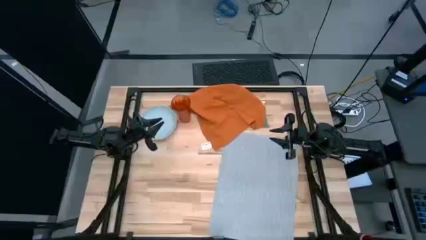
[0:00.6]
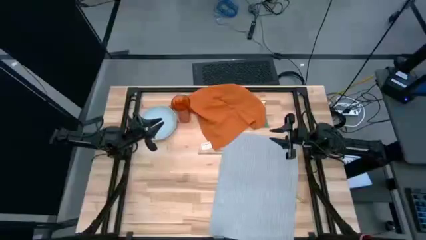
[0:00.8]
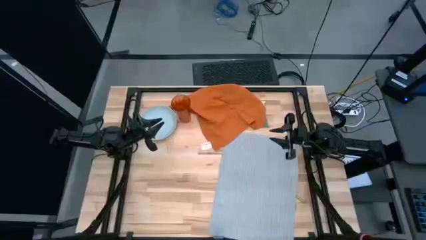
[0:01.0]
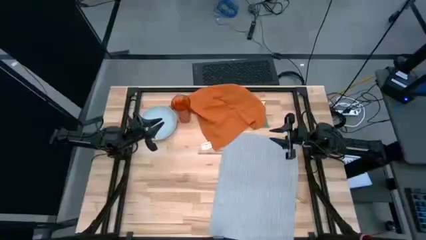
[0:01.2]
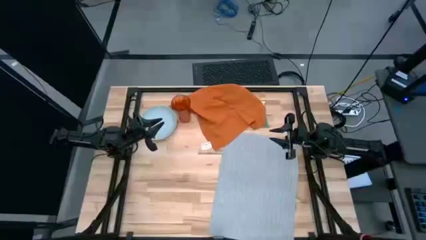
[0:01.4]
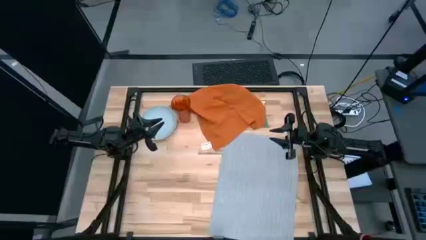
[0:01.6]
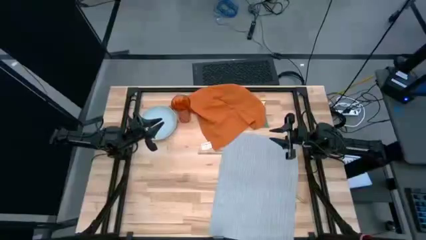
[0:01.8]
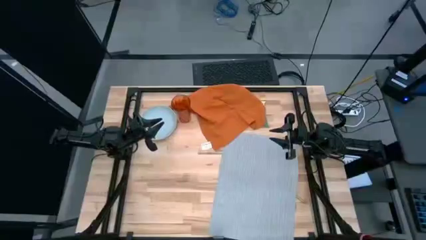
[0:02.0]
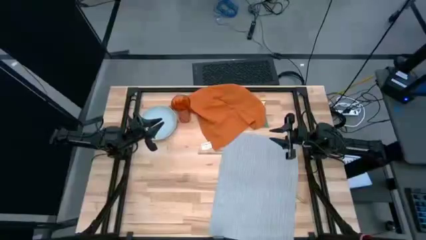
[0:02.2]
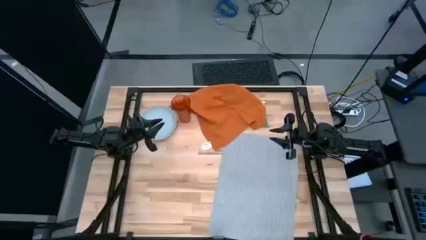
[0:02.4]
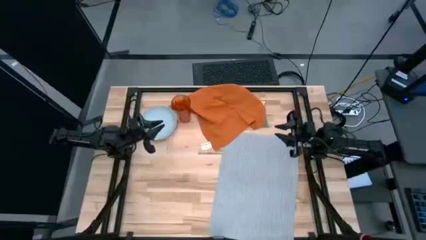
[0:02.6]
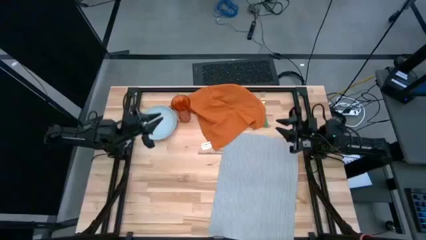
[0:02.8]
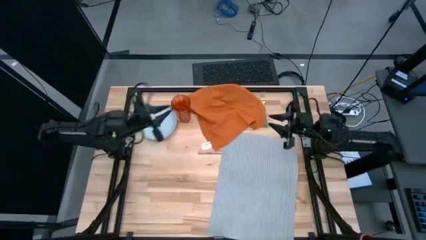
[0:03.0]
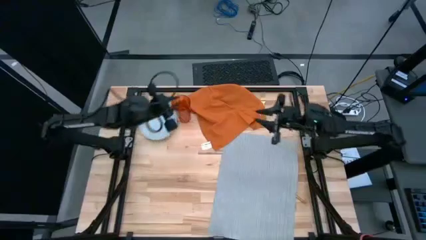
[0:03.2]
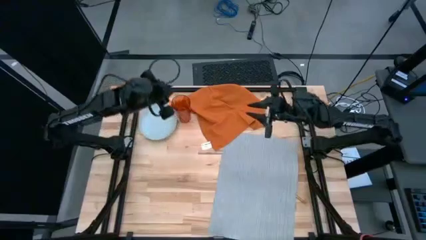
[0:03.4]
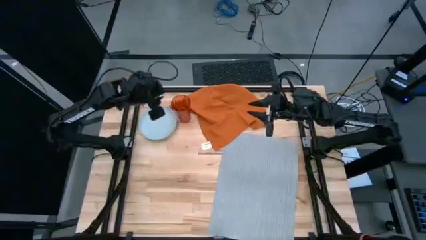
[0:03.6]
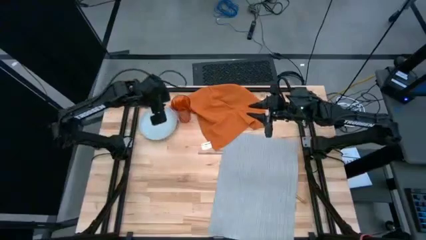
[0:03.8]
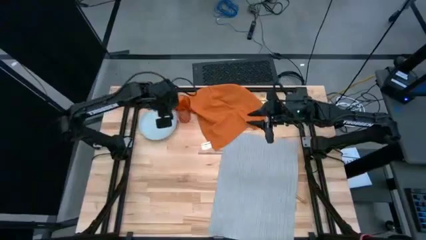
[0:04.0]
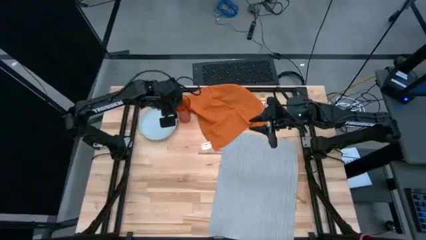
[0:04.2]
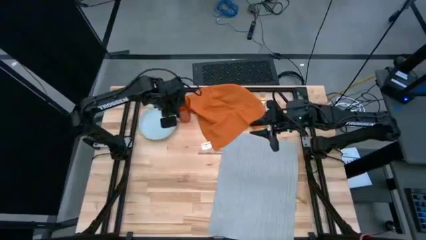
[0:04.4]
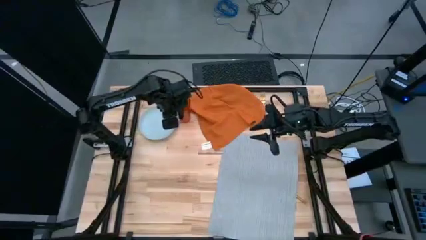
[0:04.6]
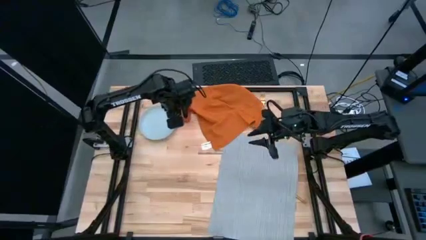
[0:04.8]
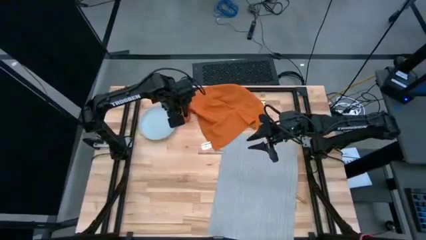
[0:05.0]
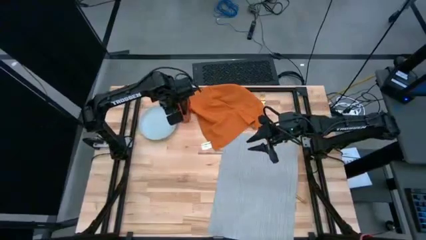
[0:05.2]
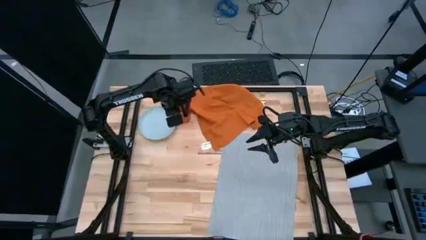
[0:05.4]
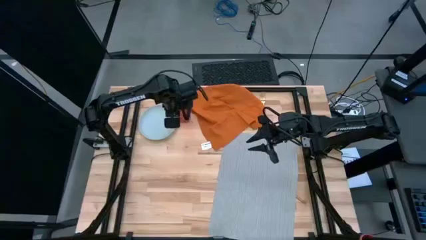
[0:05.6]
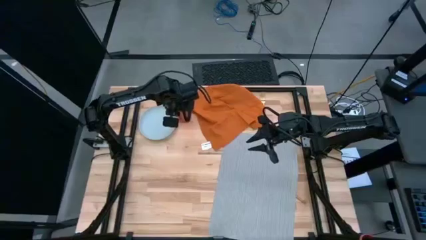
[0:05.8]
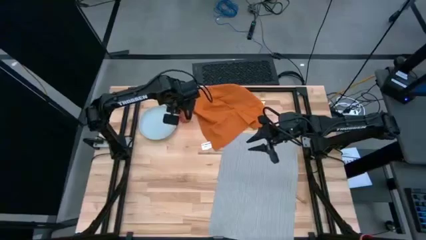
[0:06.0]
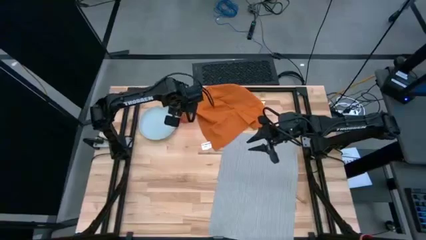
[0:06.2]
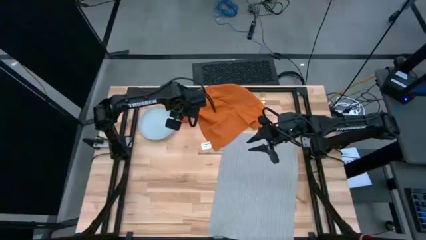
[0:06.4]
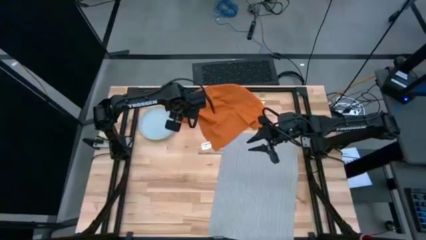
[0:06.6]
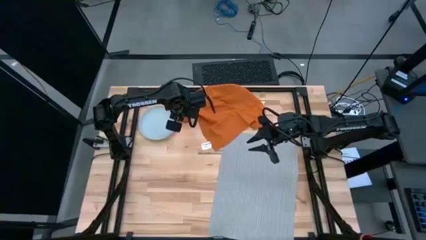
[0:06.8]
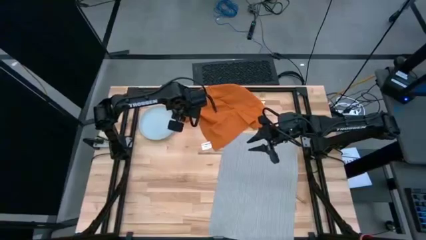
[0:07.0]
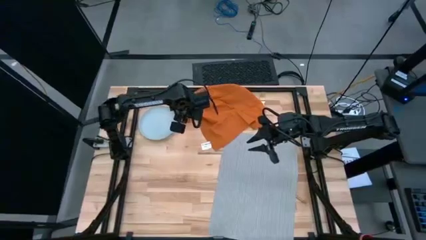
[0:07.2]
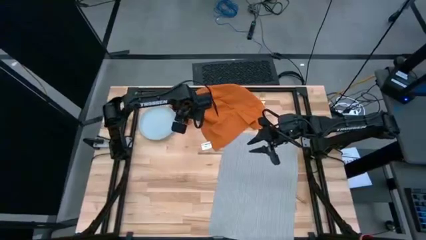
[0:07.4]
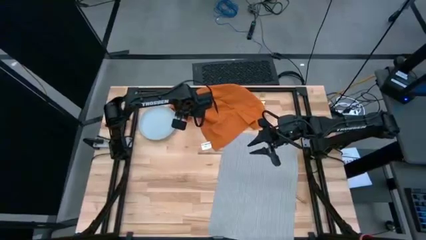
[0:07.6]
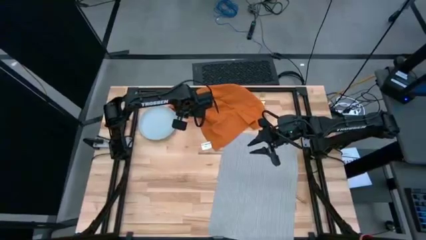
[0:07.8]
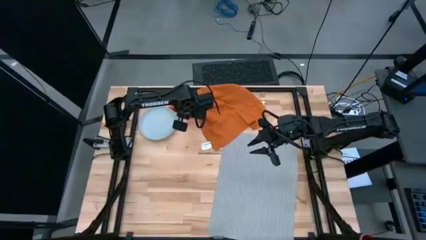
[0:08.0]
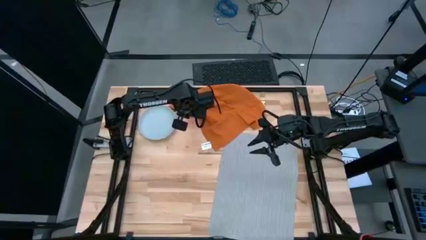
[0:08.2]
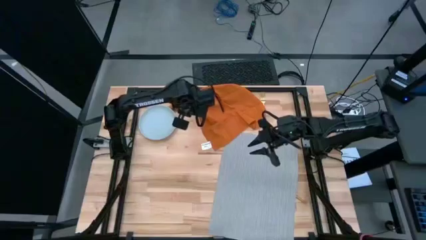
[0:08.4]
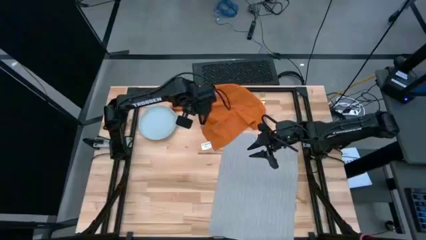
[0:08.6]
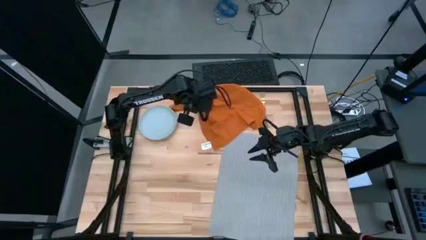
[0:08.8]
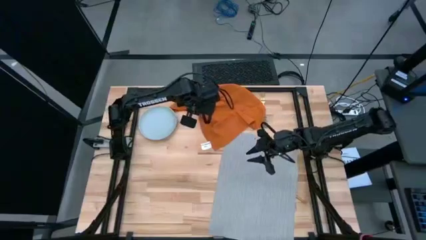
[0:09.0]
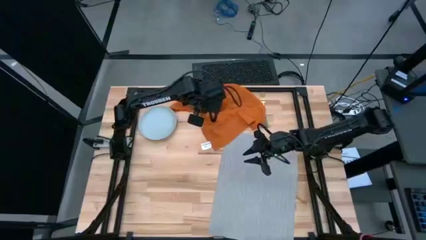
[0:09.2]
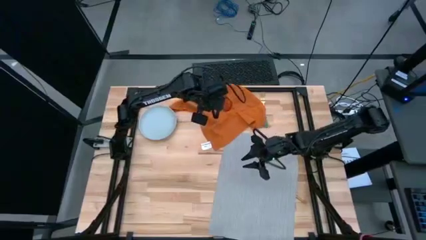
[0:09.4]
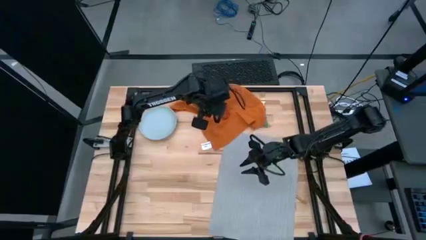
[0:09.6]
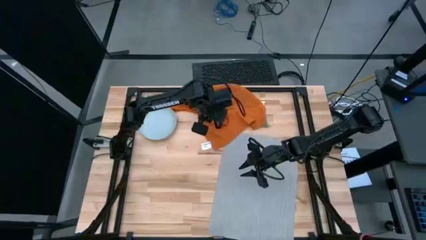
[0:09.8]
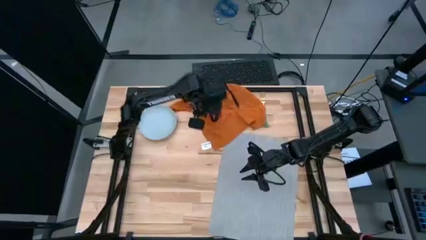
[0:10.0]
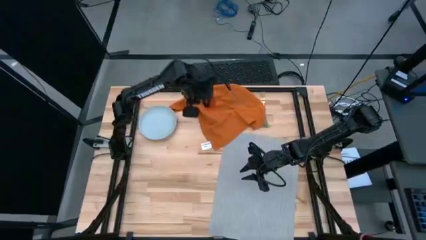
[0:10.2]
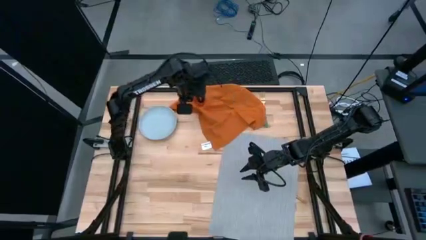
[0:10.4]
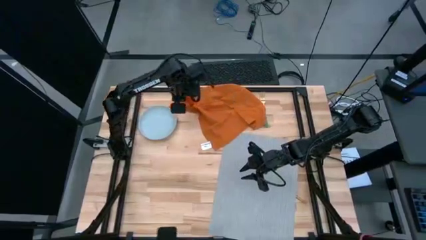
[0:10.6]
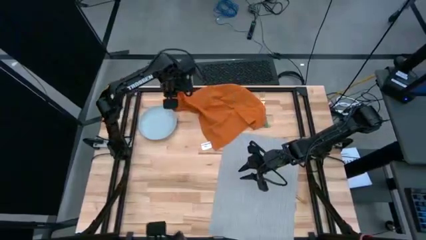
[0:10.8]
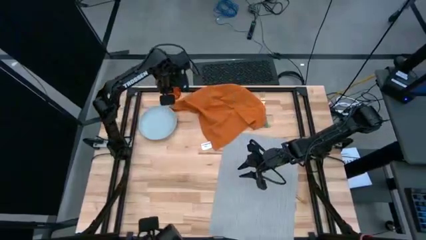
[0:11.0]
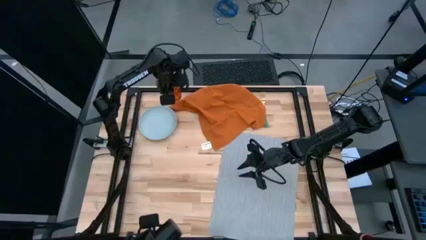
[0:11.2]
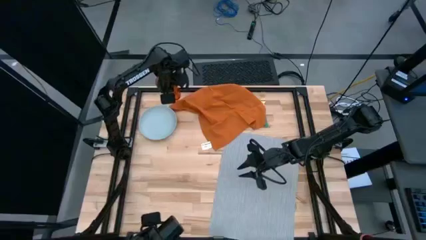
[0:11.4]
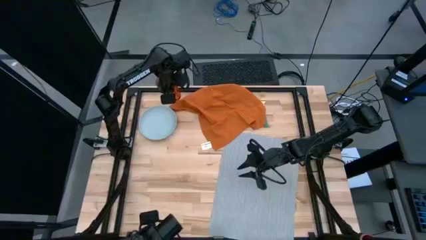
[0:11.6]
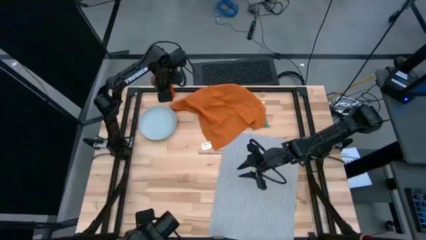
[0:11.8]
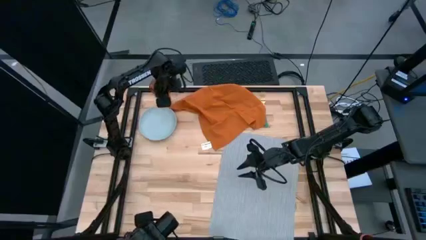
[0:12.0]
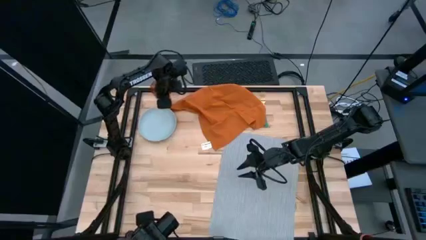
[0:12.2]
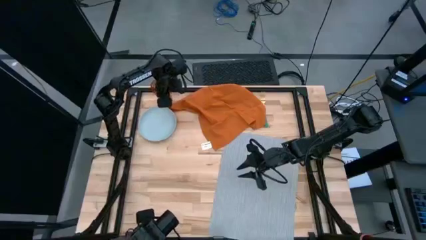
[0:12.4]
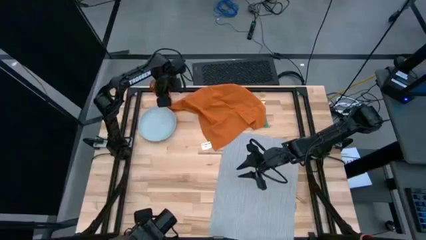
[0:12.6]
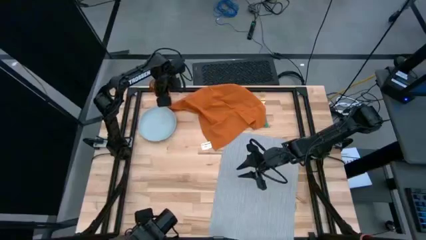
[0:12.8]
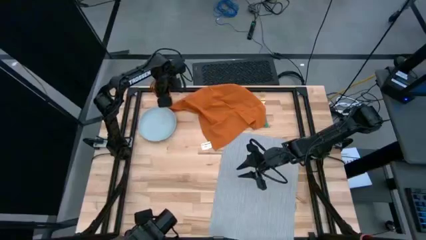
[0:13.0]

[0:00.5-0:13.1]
Task: Set table place
Move the brown cup
